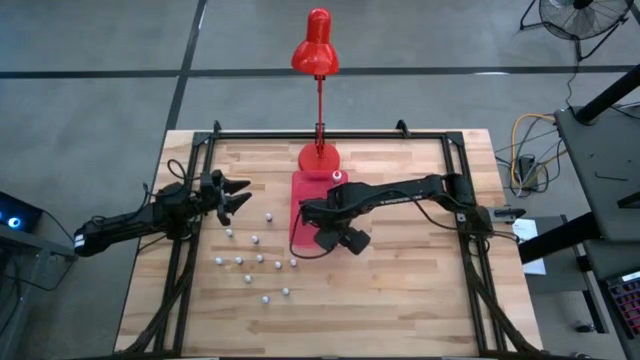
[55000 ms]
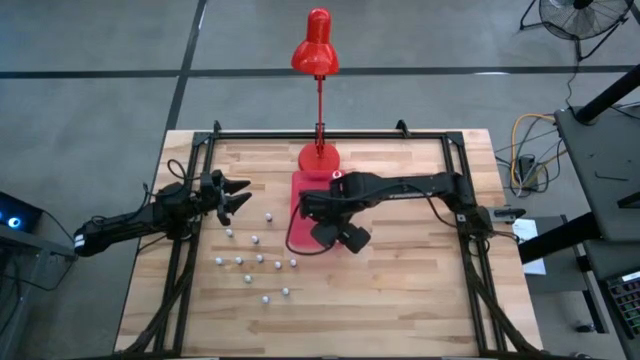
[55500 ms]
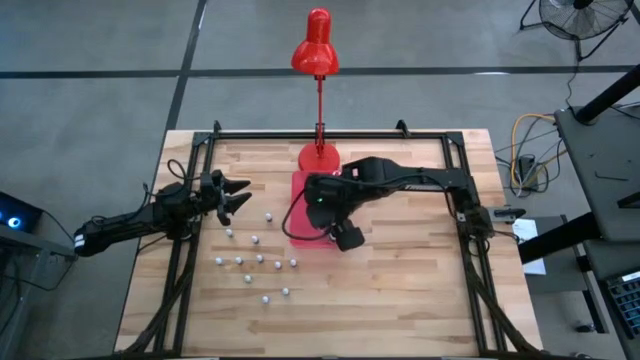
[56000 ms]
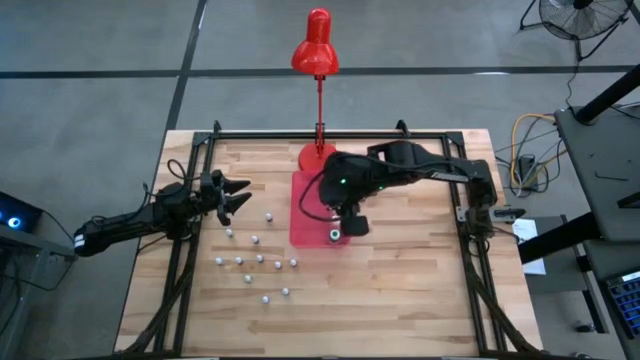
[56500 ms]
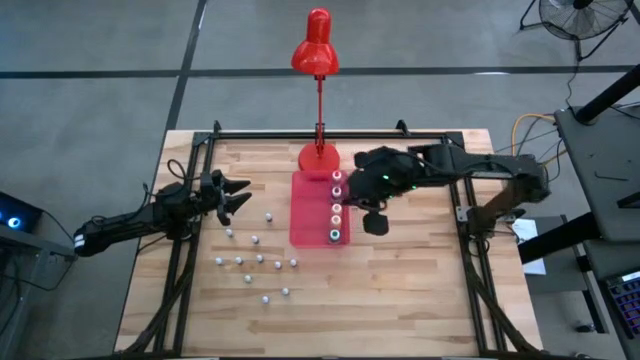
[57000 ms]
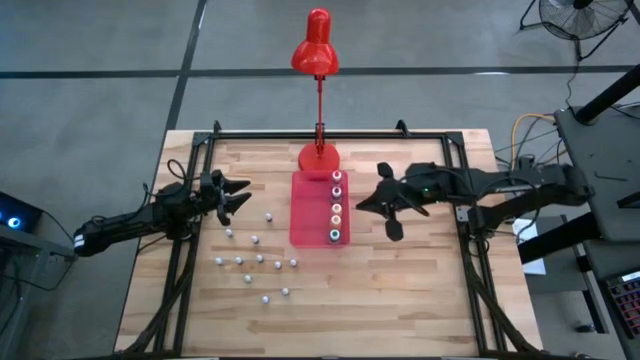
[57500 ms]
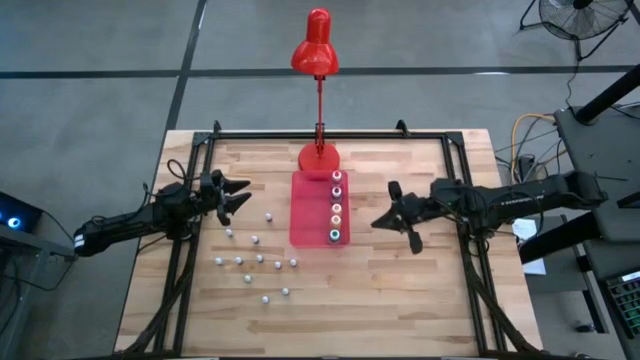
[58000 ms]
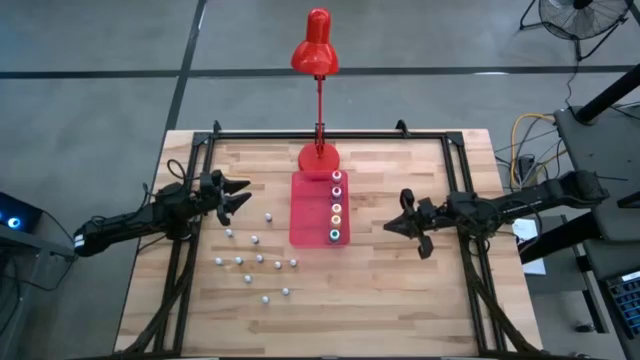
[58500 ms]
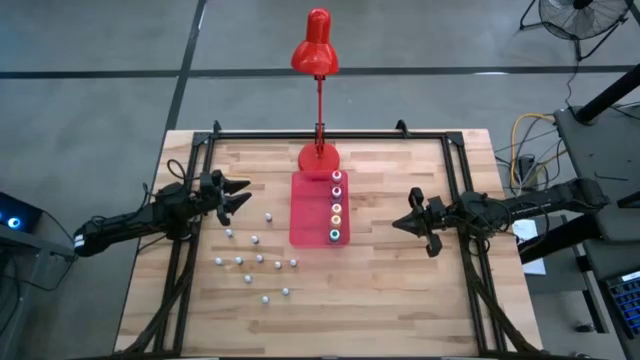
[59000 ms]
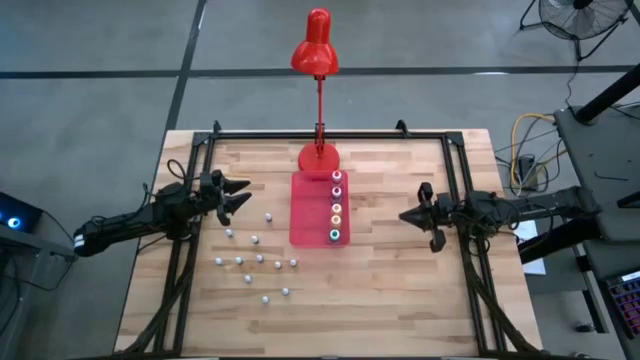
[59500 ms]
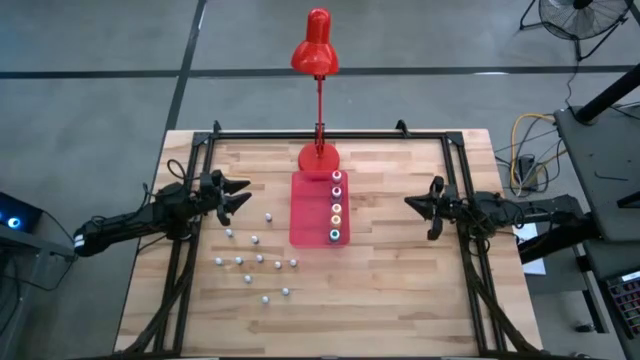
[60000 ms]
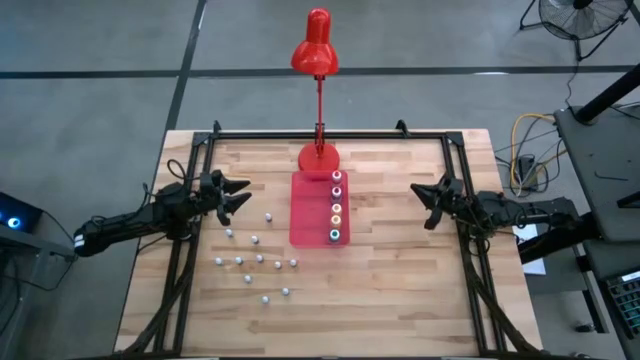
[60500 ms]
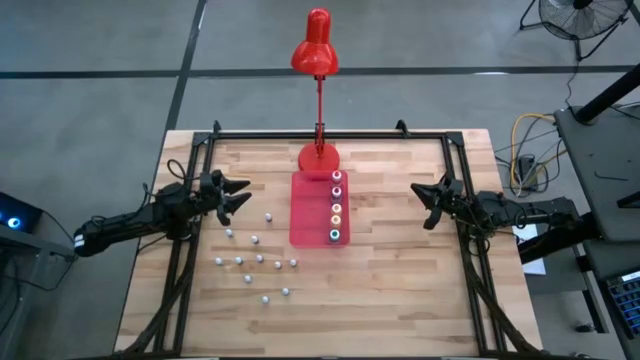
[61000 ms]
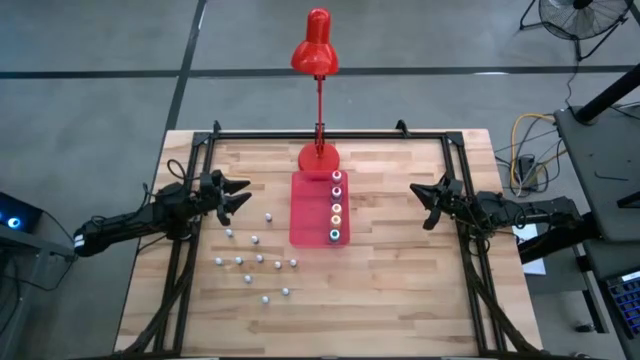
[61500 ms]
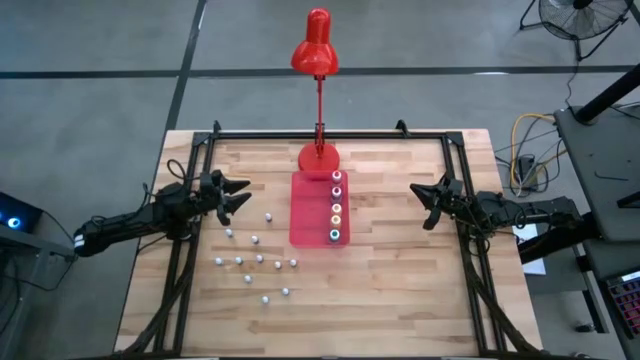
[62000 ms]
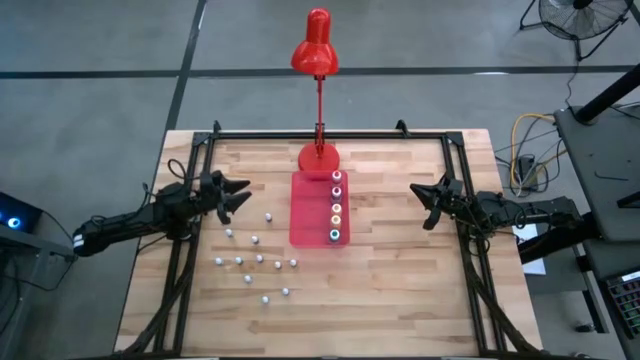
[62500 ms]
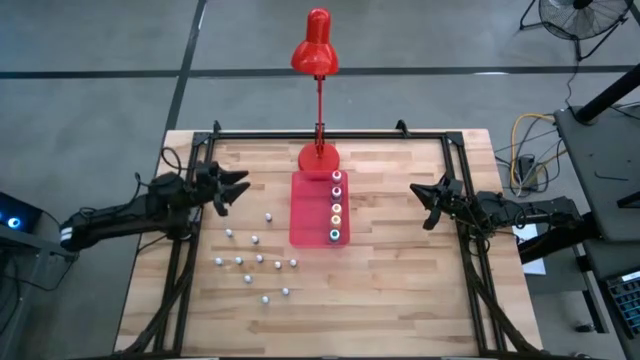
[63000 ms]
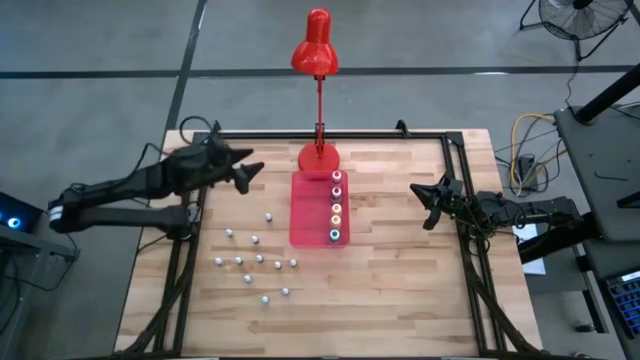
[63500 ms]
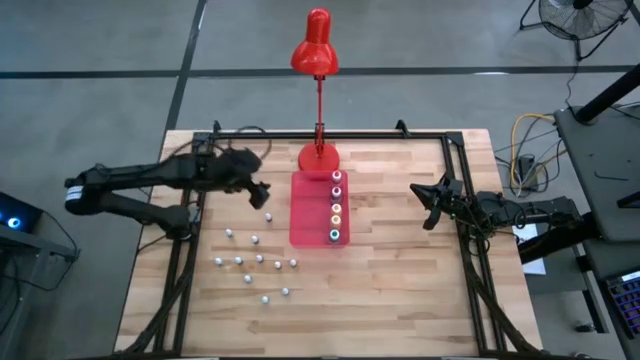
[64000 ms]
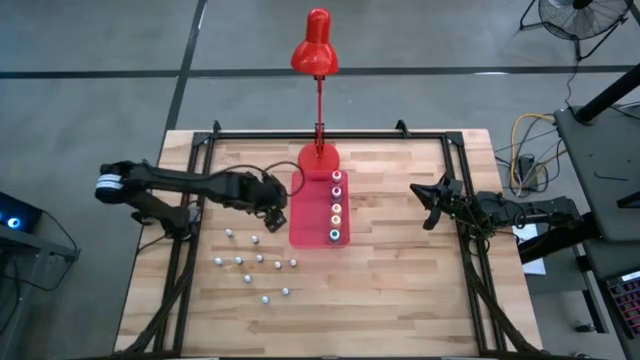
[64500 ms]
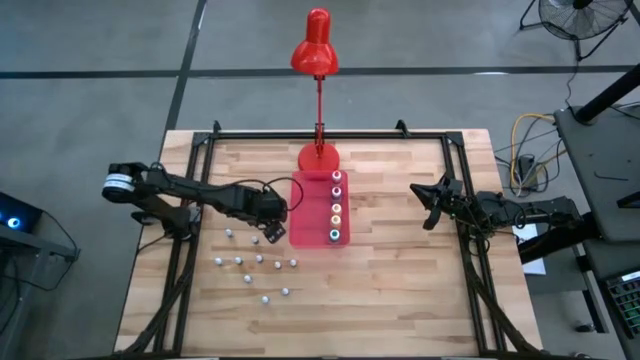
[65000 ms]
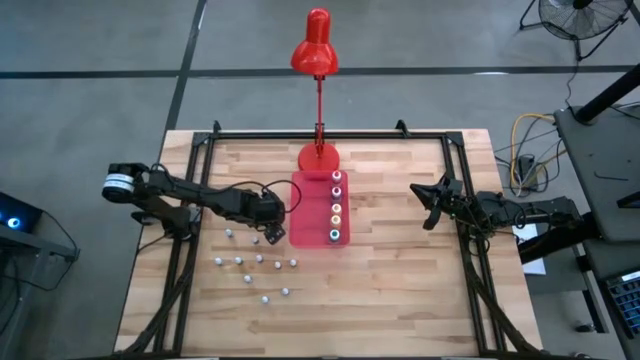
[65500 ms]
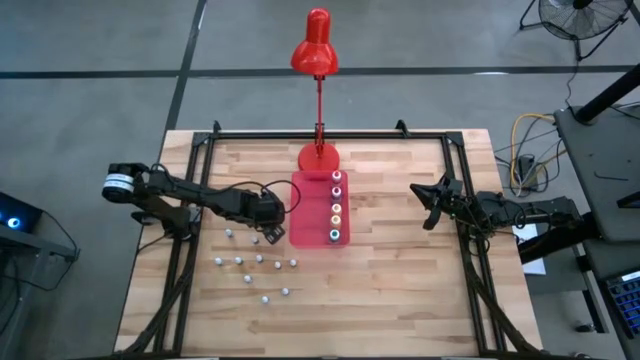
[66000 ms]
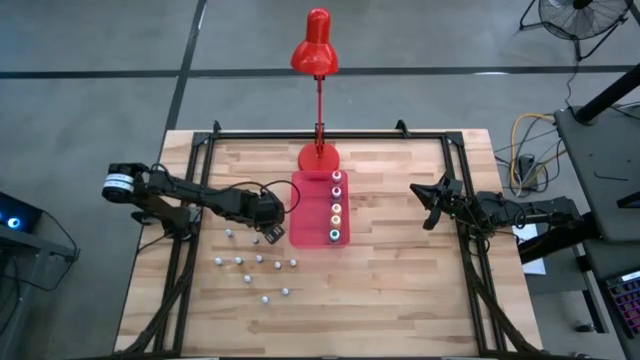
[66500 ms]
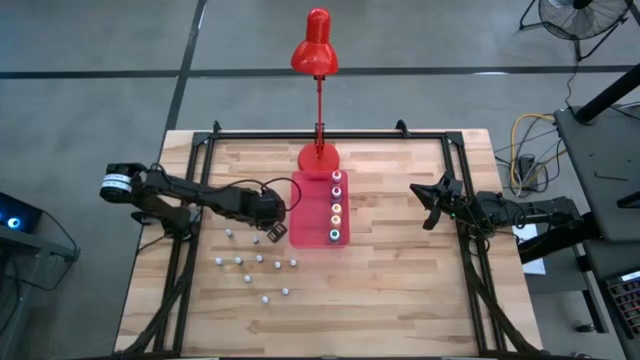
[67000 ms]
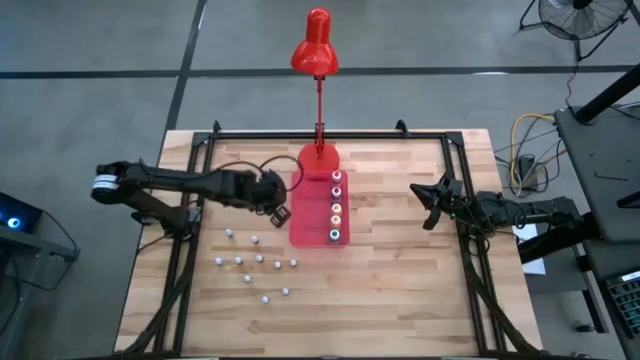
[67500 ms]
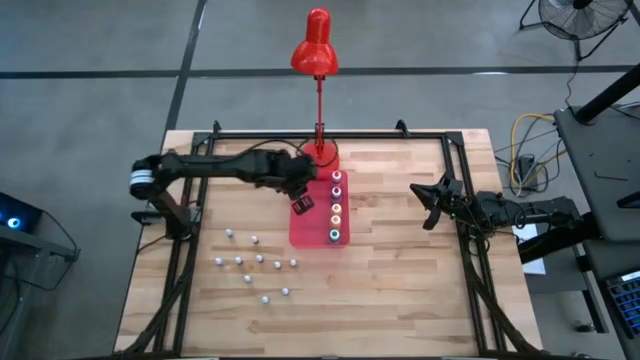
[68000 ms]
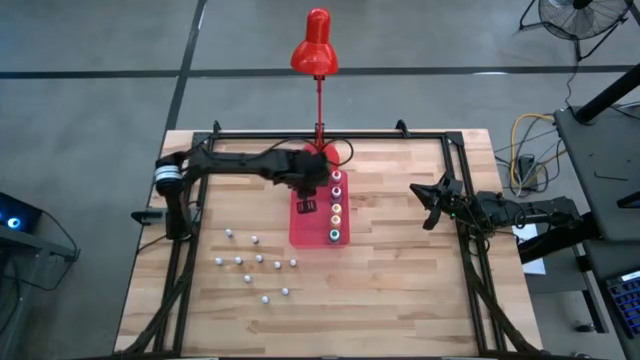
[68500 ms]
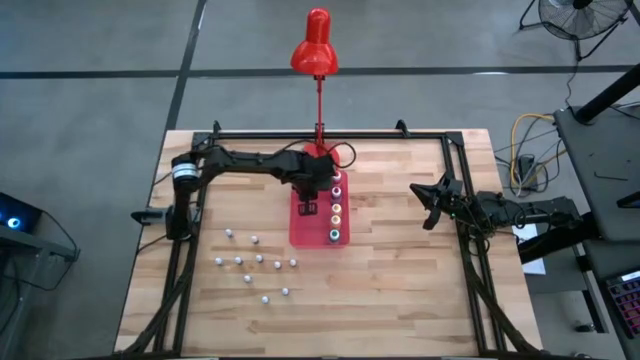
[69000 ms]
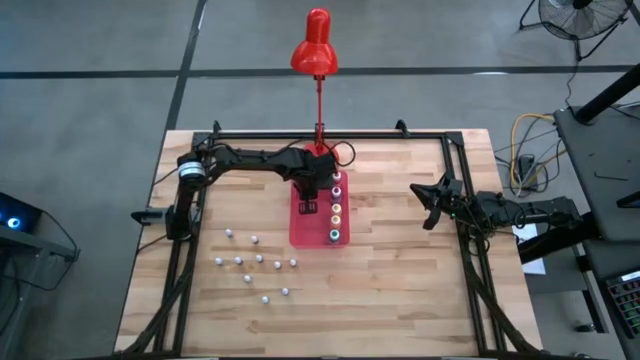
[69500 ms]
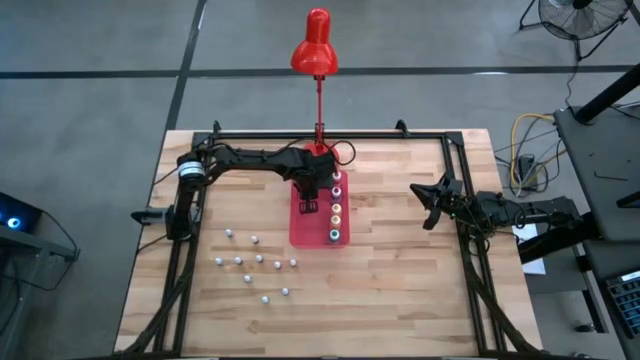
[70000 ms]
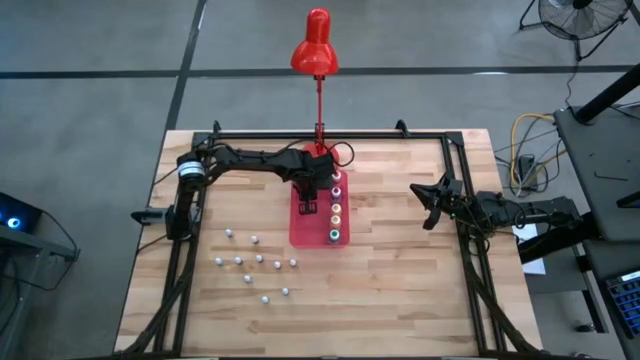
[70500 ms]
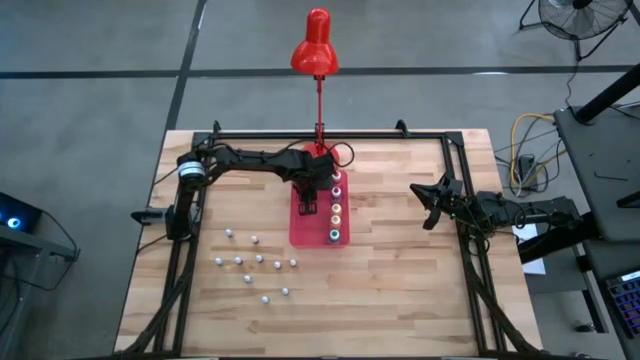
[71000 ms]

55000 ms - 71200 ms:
Task: Pick & Place food coloring
Put the small orange food coloring bottle into the pink bin

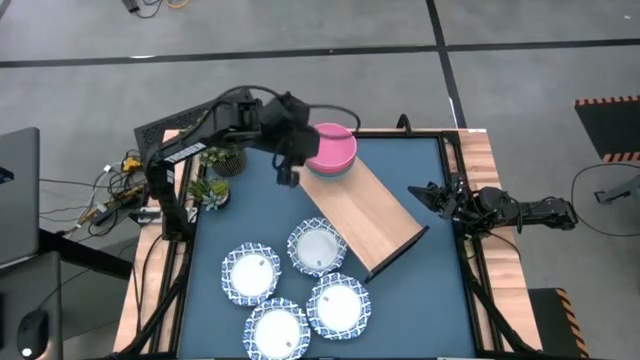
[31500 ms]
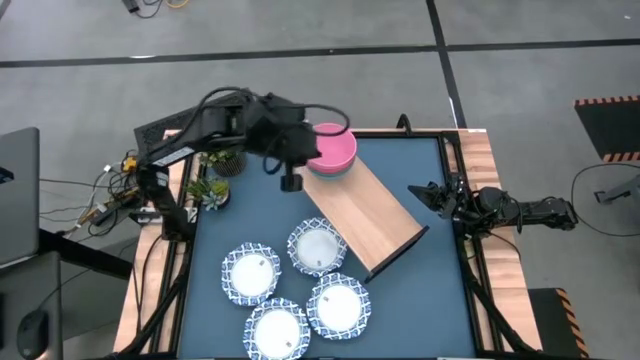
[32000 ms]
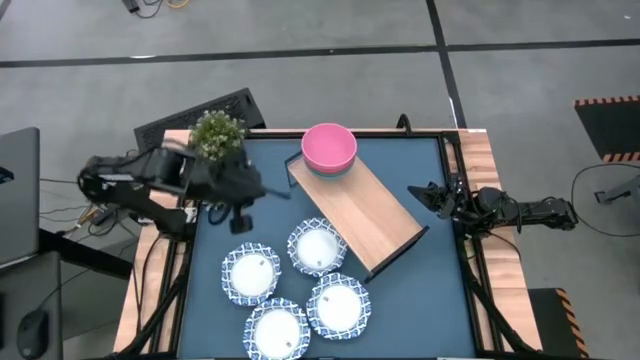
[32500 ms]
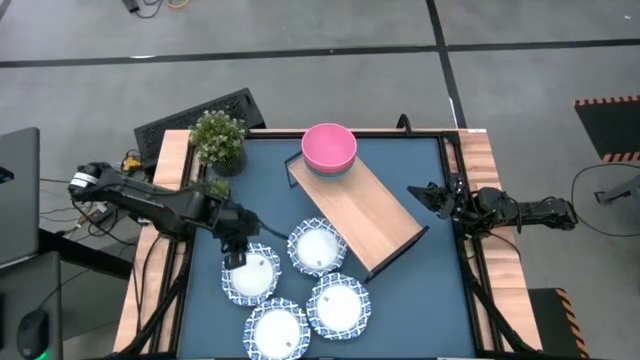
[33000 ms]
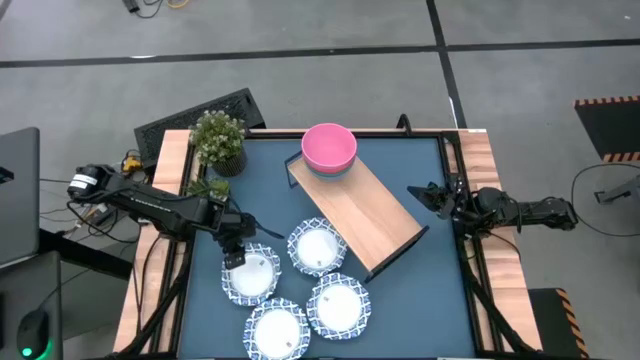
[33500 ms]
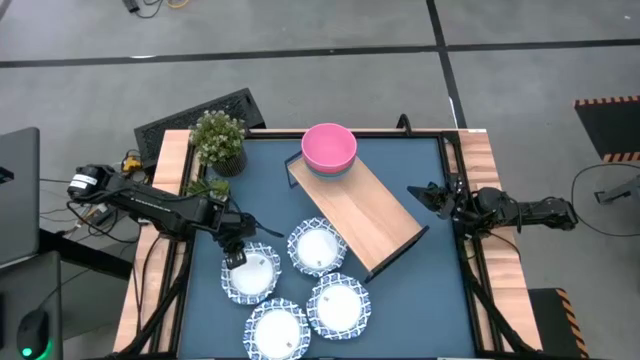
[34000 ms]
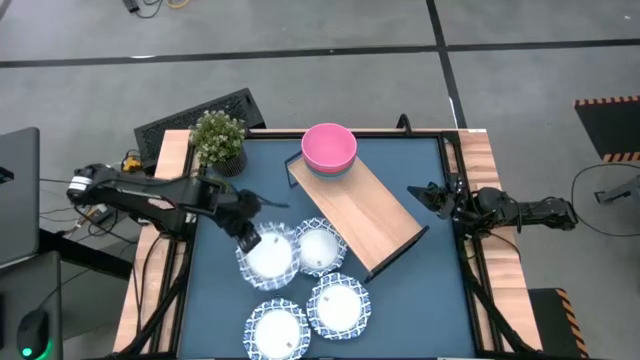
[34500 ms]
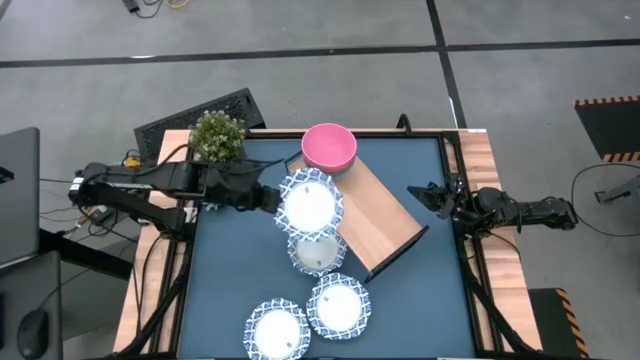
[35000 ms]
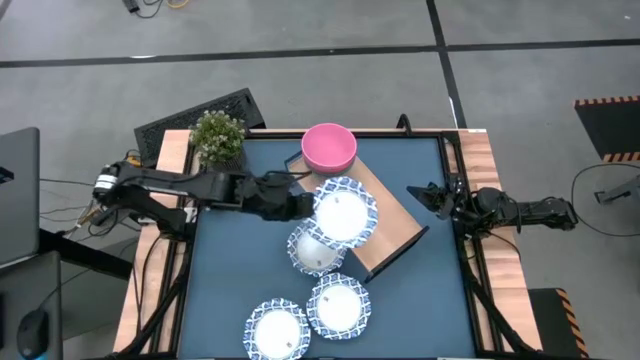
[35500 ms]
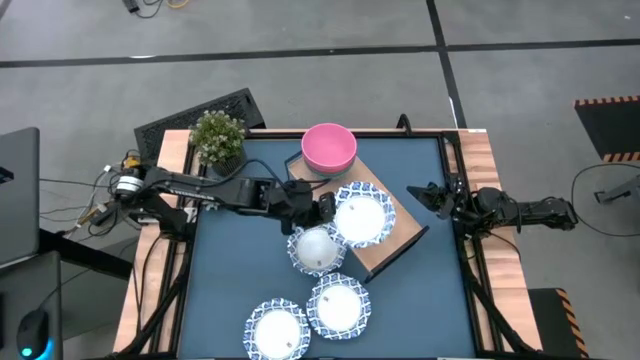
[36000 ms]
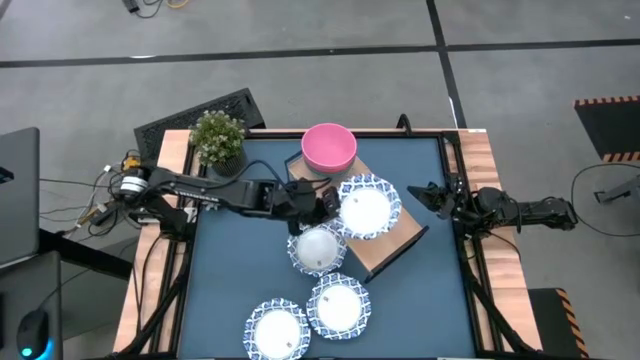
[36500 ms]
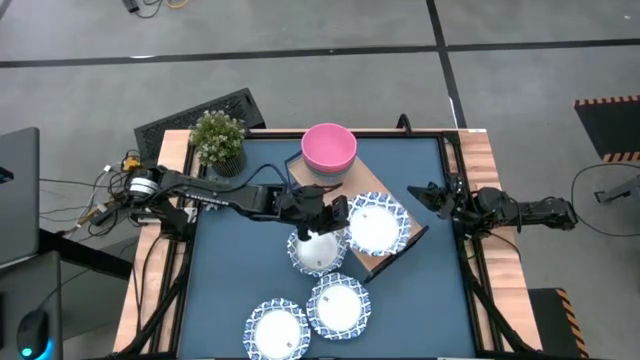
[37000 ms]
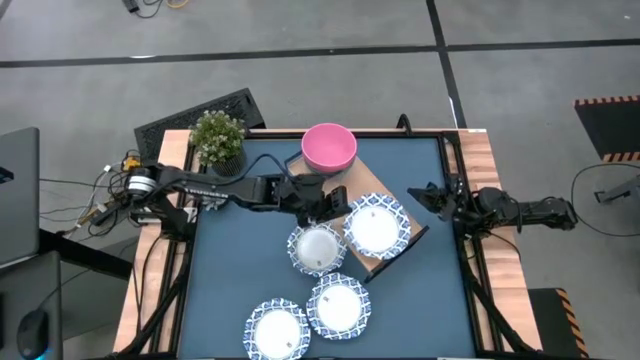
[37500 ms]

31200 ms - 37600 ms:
Task: Place and stack plates onto a shelf
Put the white and blue plate on the shelf
